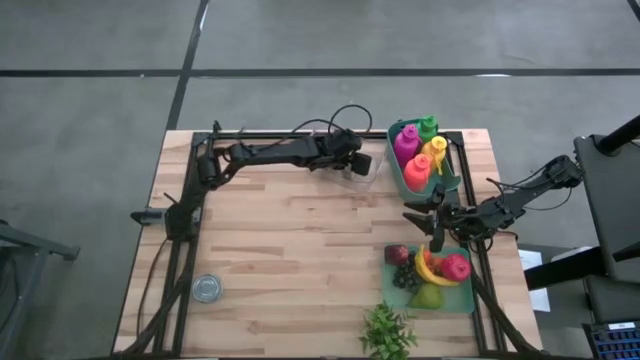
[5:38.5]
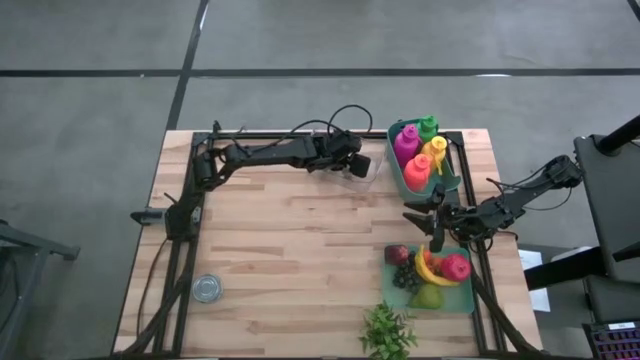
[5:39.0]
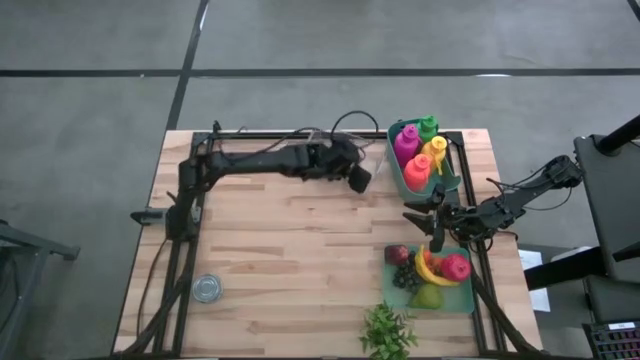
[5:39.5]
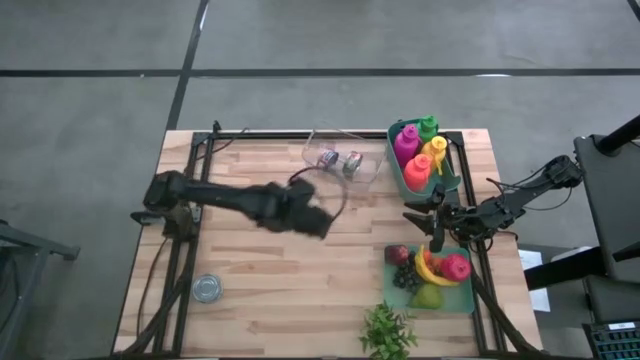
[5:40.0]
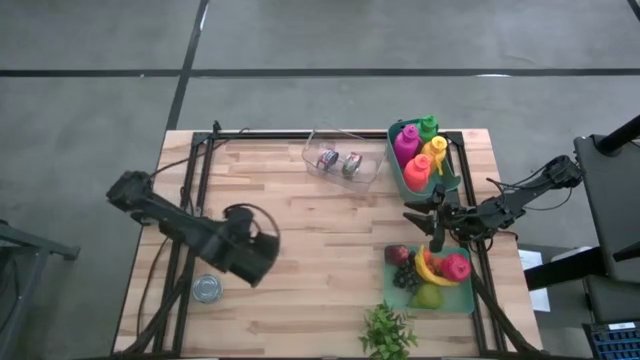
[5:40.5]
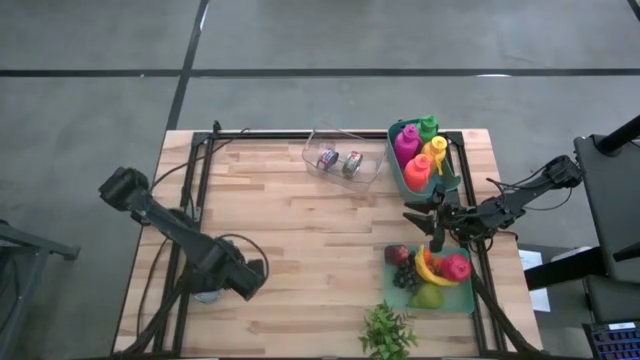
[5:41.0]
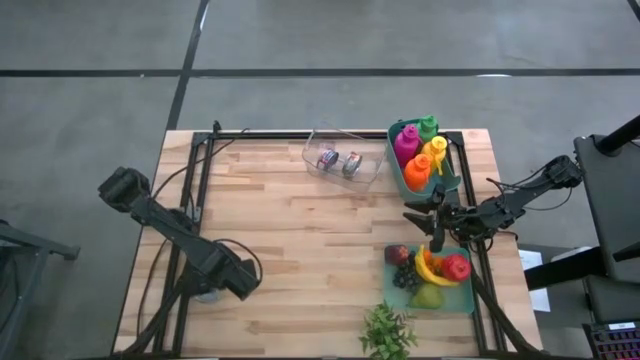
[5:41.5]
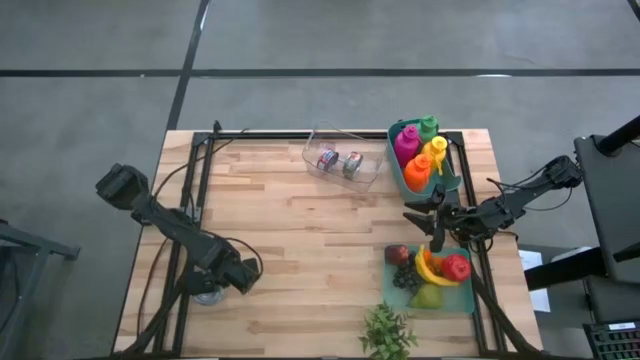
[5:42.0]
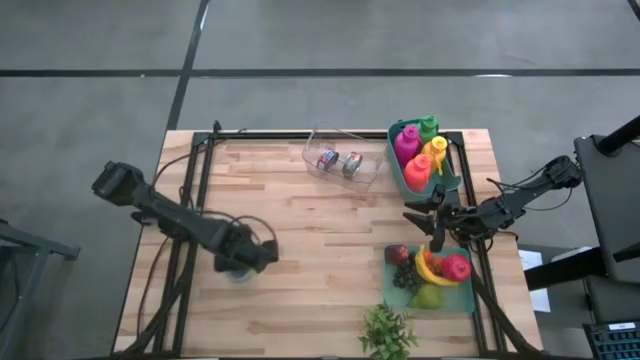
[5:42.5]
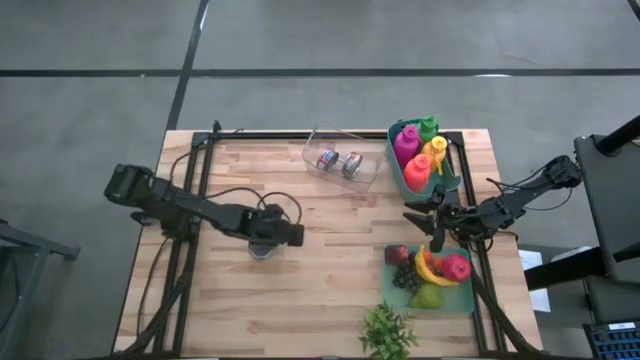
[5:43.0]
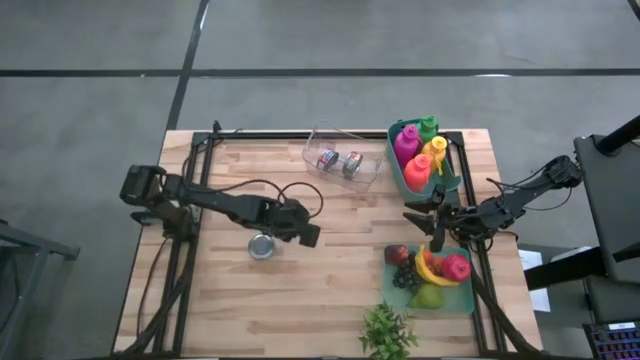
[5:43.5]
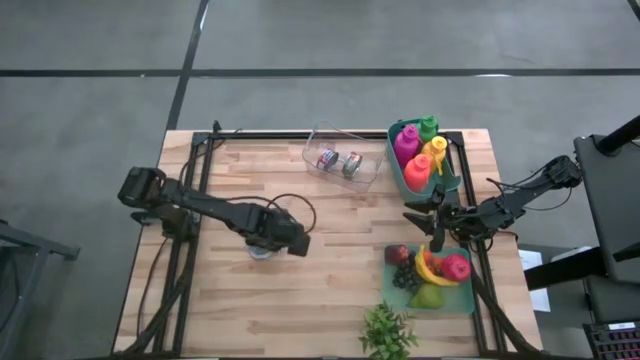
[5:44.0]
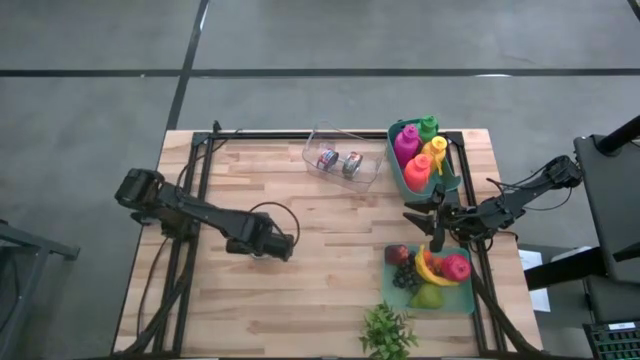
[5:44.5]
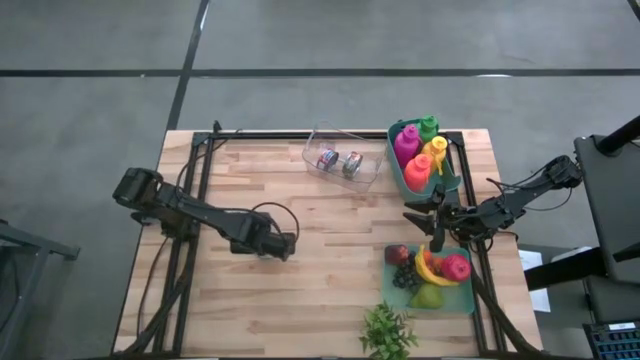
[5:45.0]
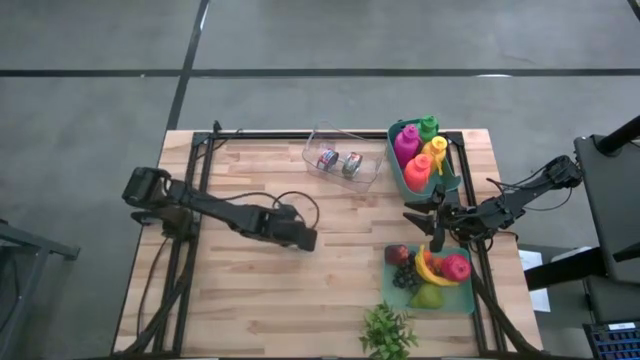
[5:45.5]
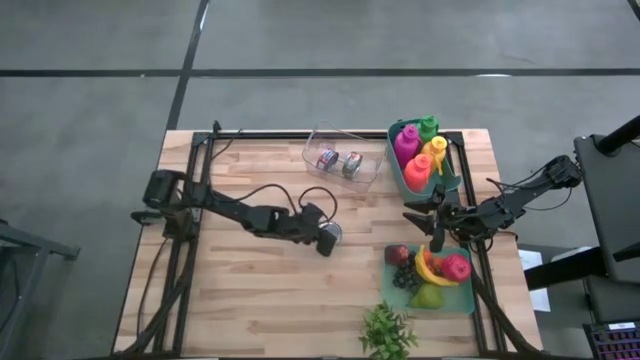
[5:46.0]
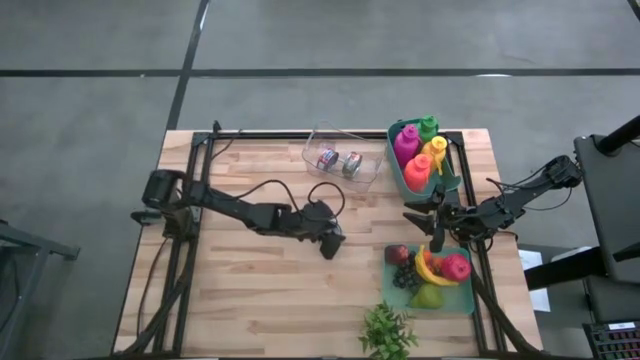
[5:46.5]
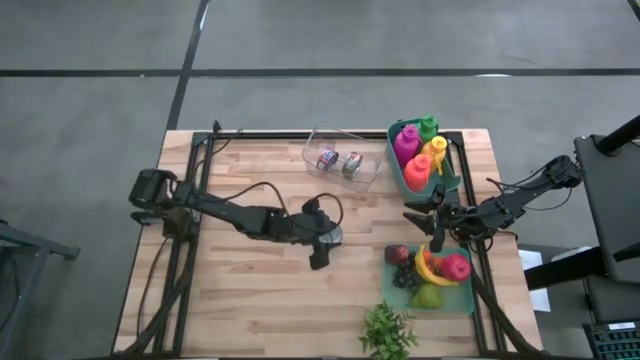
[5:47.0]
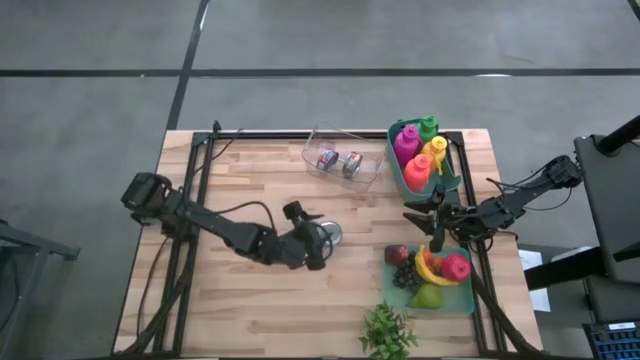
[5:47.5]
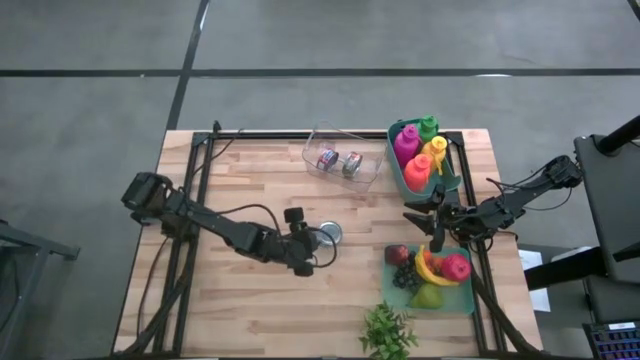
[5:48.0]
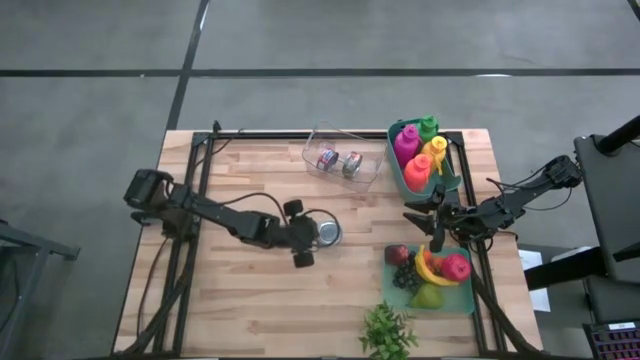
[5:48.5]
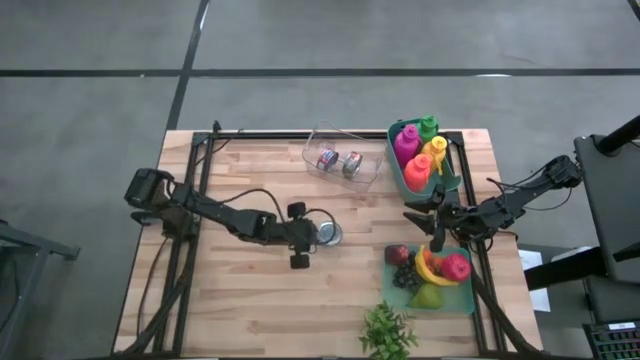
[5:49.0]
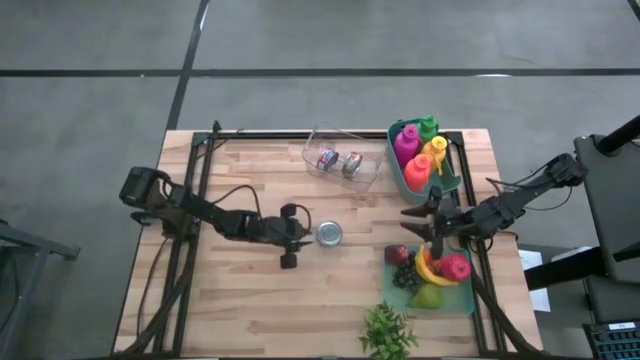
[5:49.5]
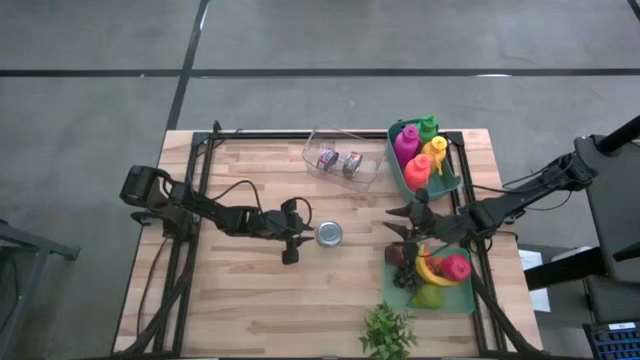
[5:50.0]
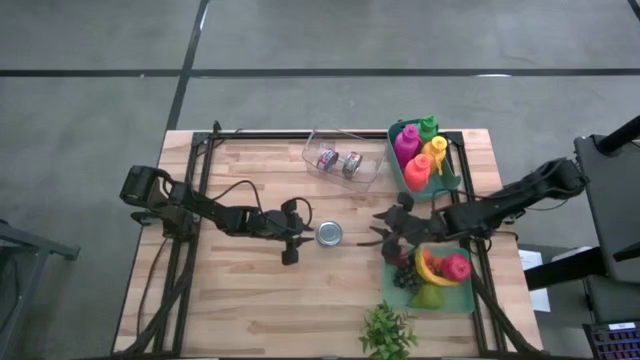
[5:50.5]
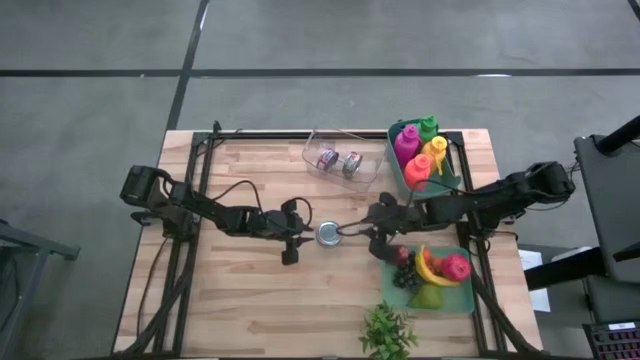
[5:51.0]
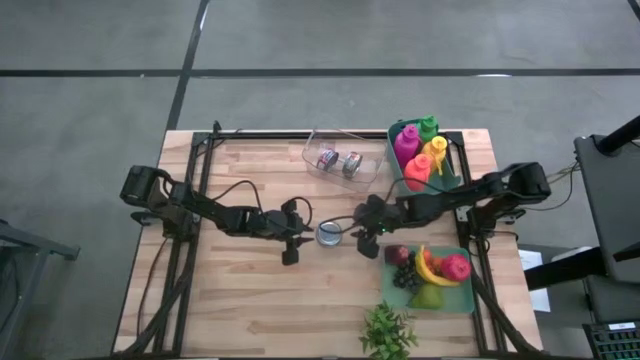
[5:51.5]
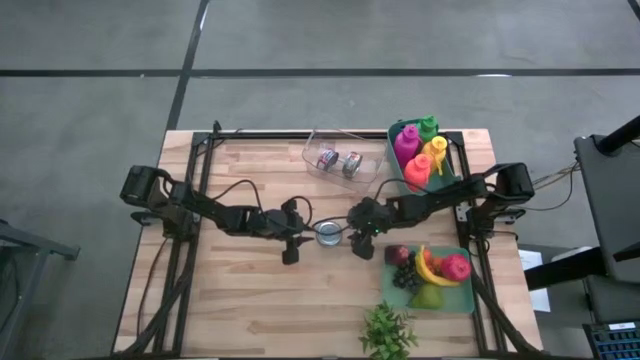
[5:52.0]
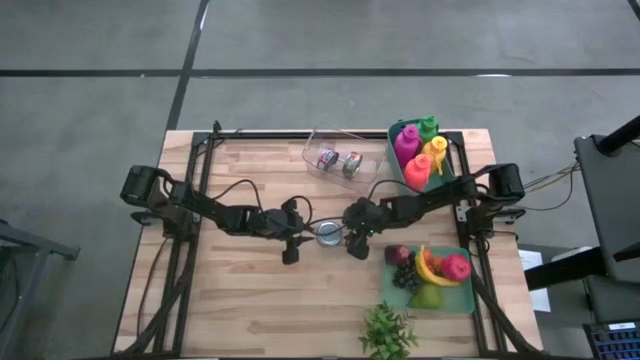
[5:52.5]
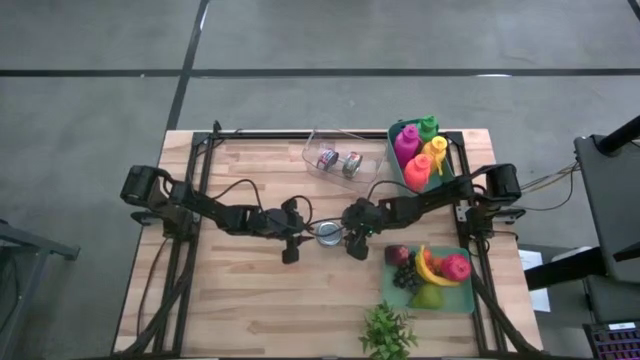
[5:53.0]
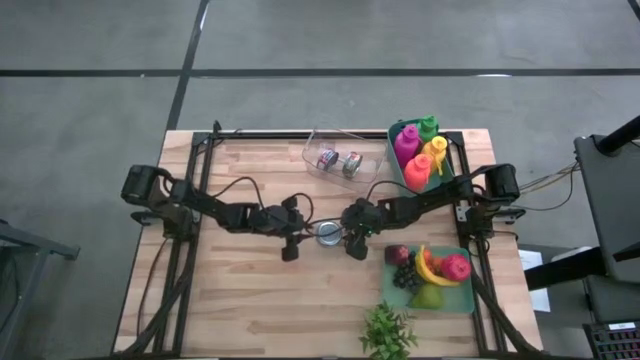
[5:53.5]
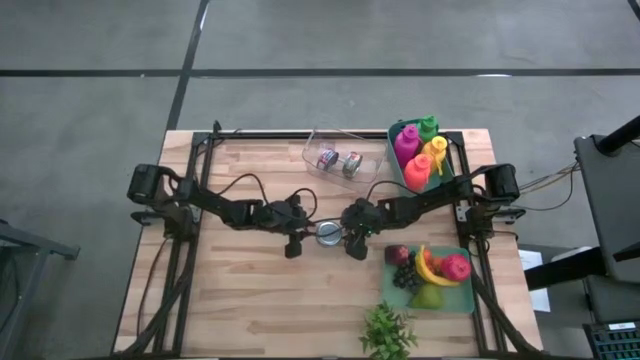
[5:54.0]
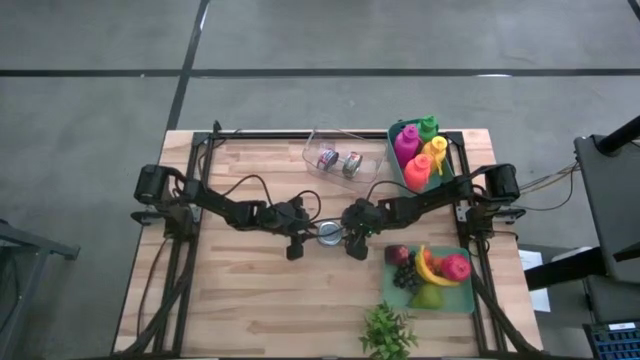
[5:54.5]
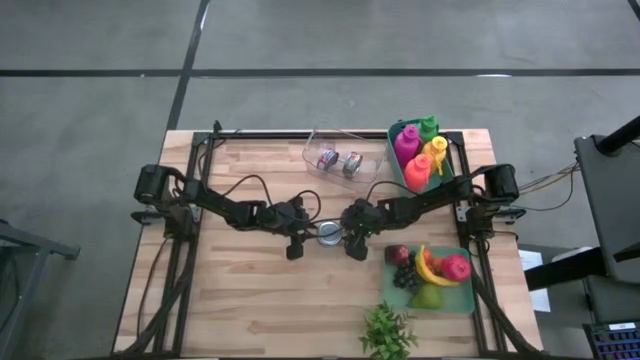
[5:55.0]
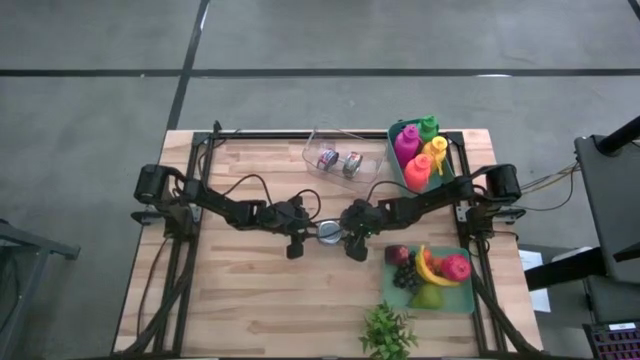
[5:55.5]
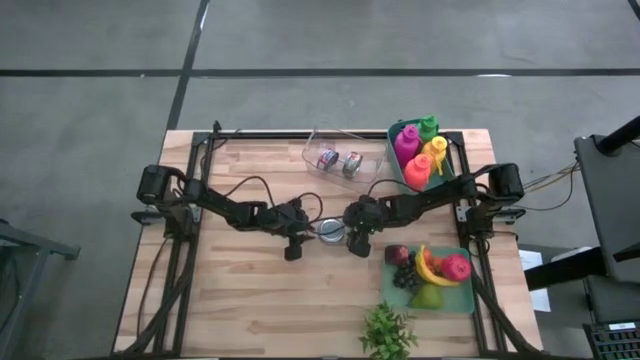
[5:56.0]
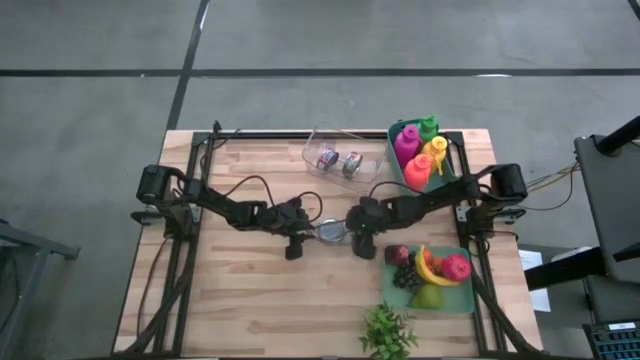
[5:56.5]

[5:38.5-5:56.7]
Task: Pick & Place Food Item
Put the green tuna can into the transparent bin

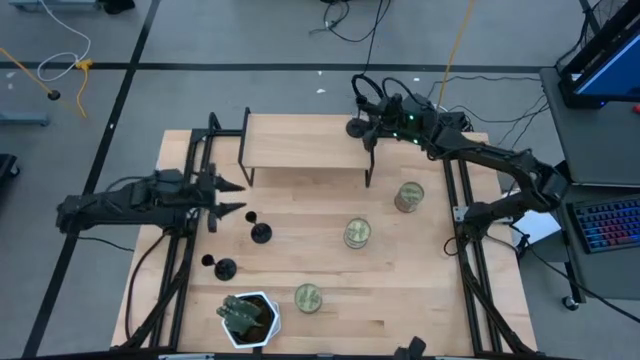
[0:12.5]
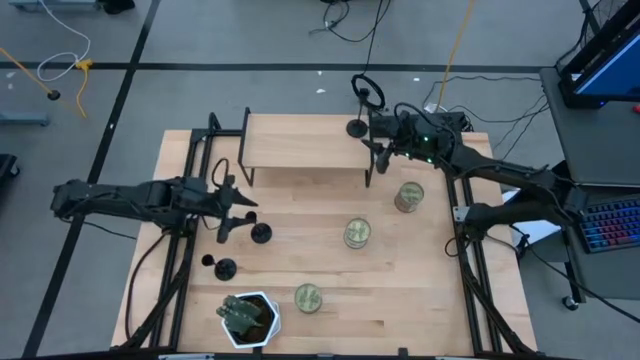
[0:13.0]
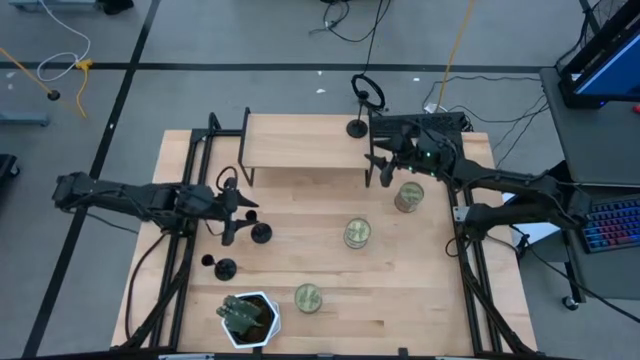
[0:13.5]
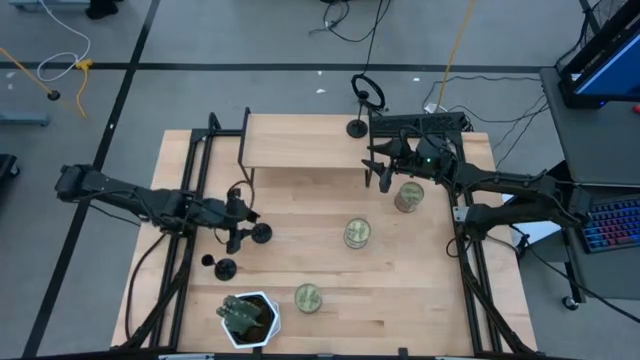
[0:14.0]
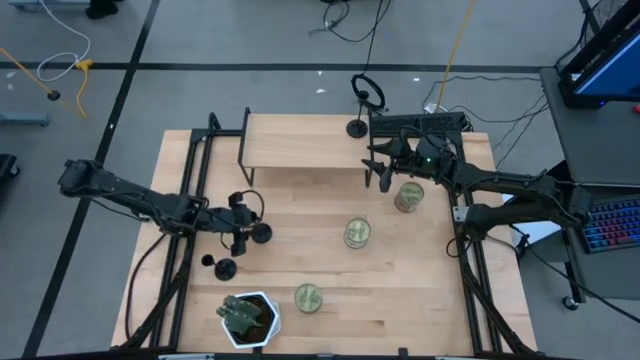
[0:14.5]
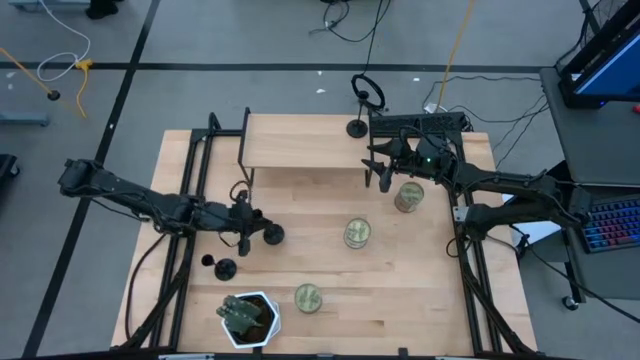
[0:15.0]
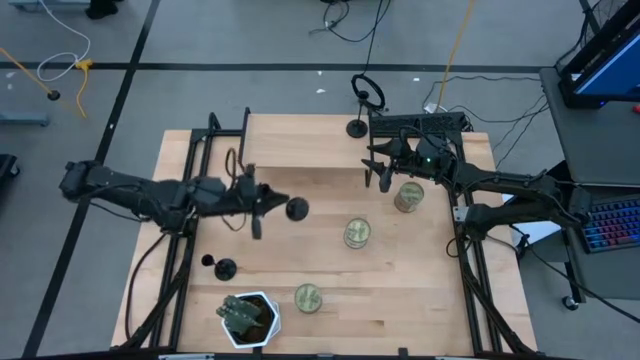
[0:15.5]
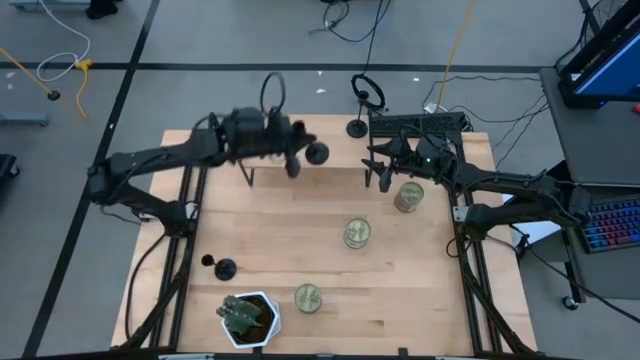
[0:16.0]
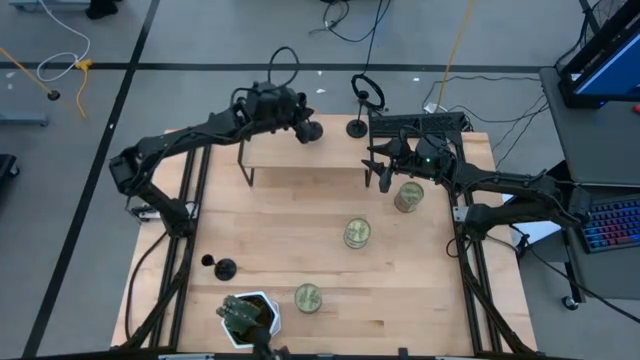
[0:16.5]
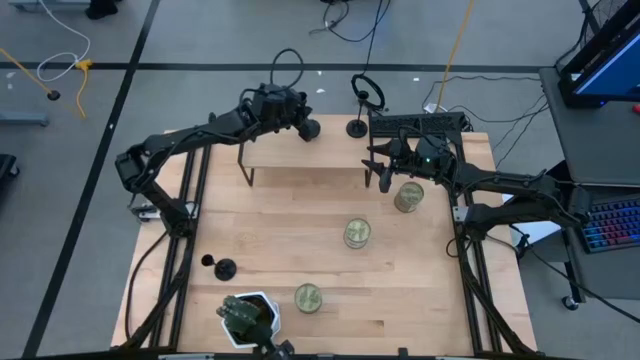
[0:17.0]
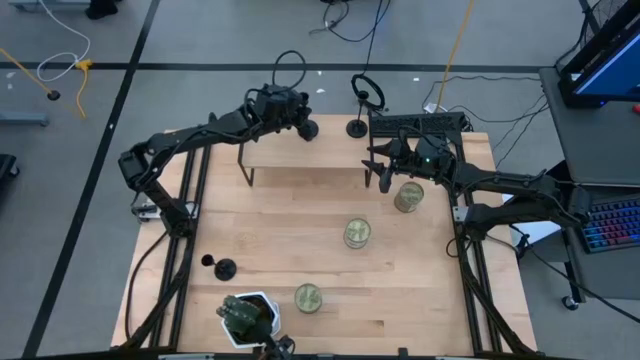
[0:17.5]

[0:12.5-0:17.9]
Task: Pick & Place candle stick holders
Put the right candle holder on the shelf
